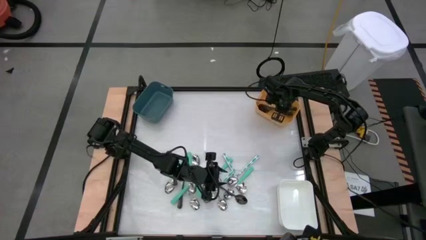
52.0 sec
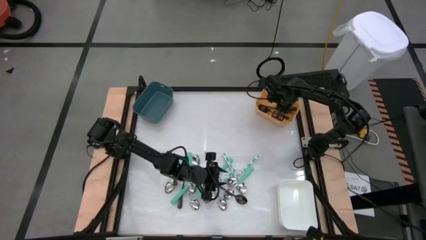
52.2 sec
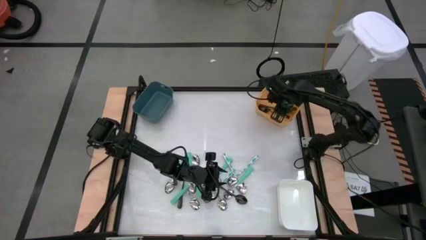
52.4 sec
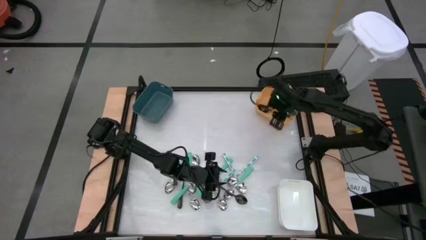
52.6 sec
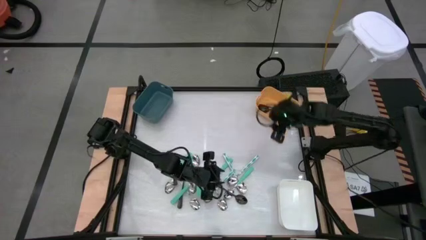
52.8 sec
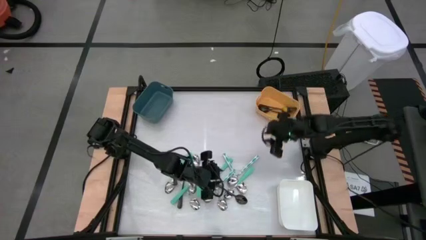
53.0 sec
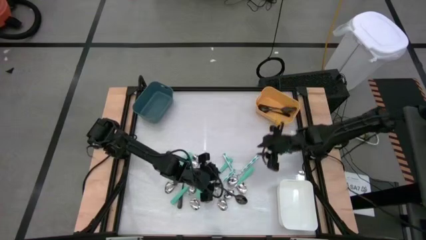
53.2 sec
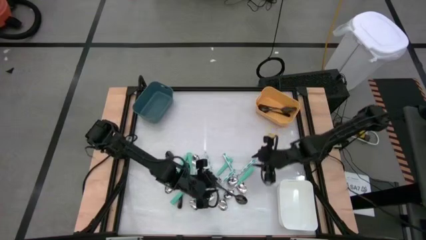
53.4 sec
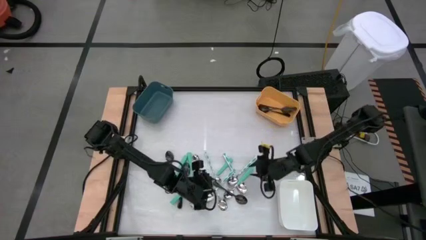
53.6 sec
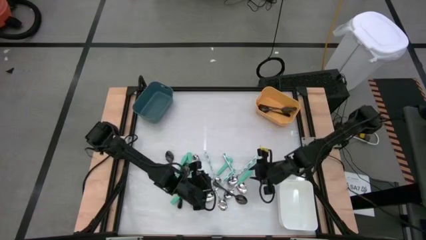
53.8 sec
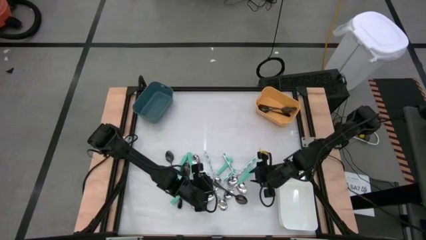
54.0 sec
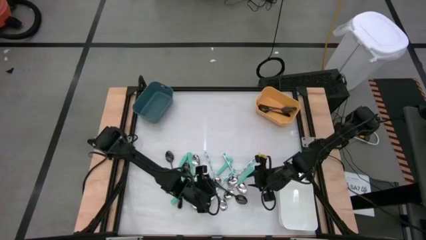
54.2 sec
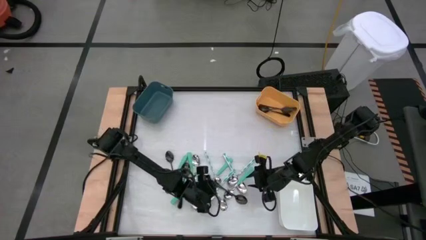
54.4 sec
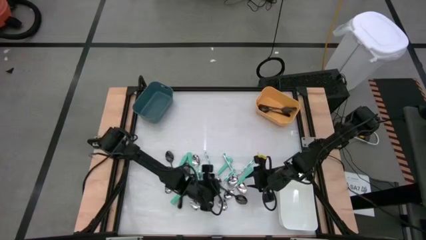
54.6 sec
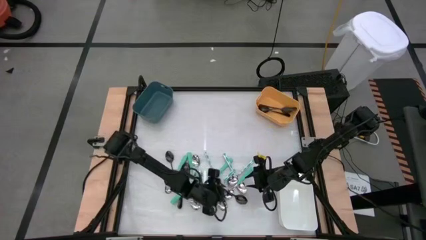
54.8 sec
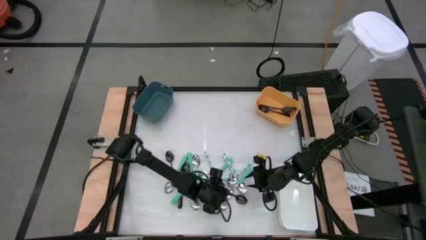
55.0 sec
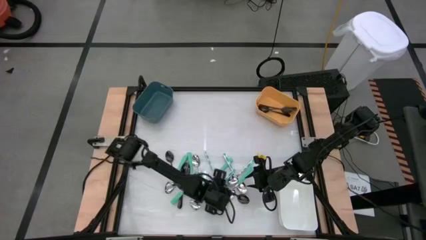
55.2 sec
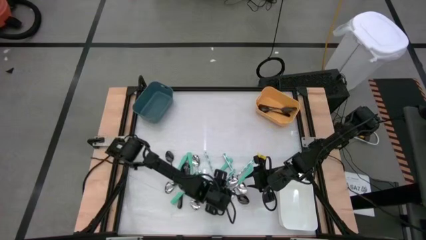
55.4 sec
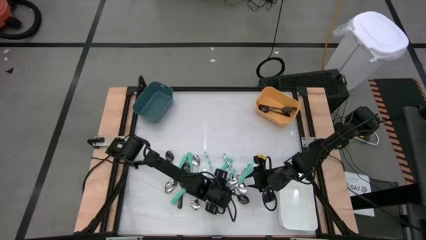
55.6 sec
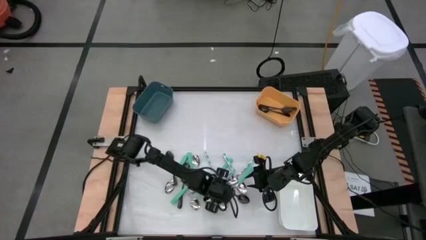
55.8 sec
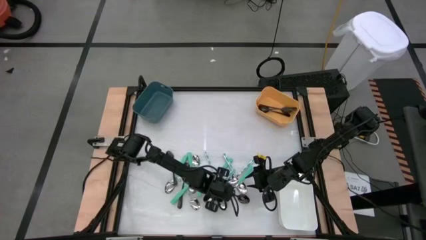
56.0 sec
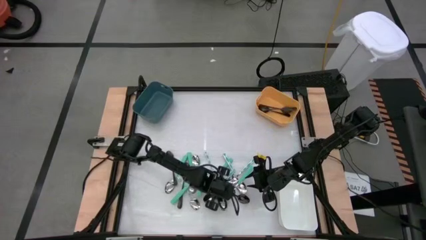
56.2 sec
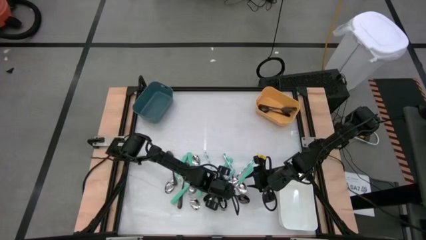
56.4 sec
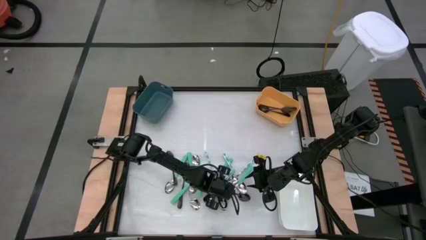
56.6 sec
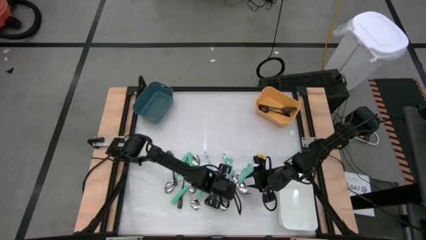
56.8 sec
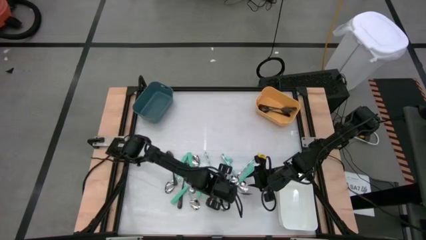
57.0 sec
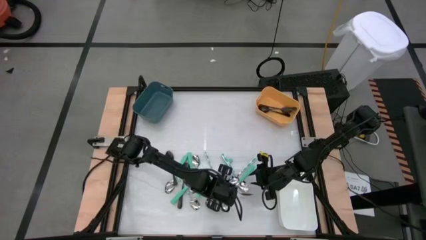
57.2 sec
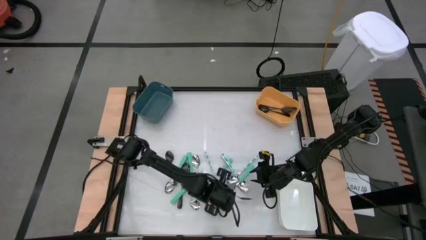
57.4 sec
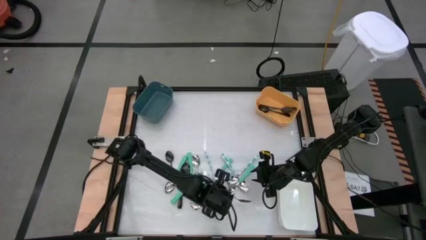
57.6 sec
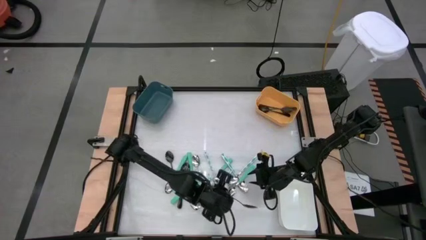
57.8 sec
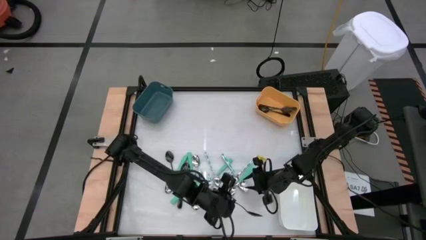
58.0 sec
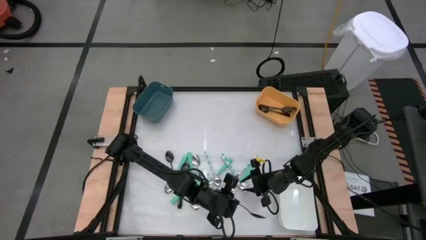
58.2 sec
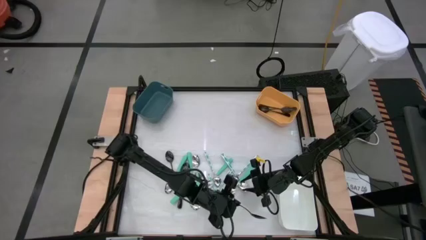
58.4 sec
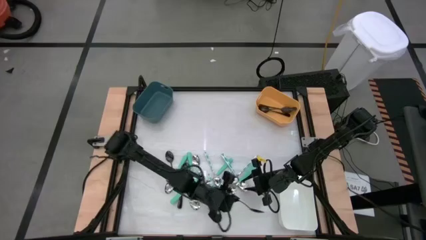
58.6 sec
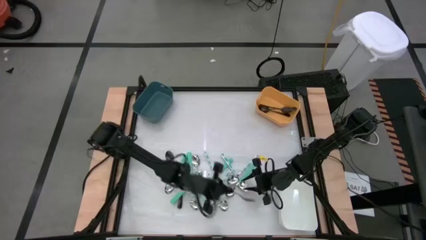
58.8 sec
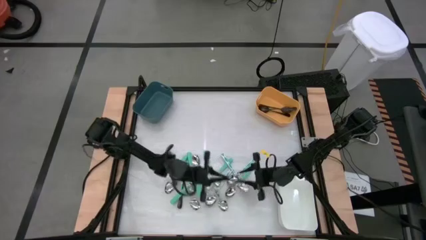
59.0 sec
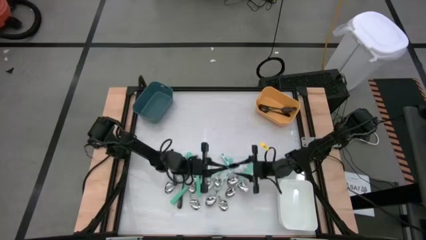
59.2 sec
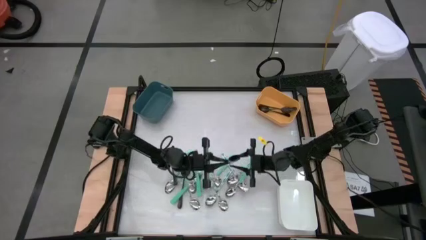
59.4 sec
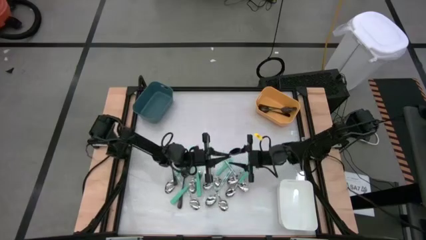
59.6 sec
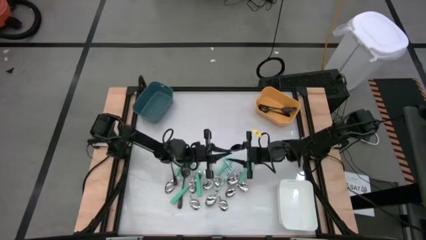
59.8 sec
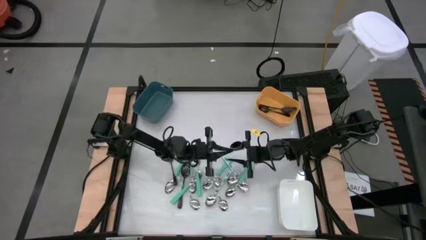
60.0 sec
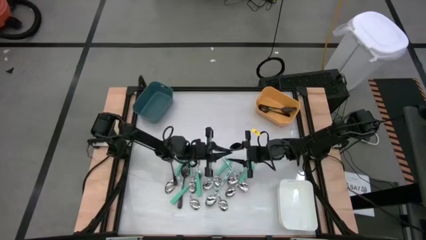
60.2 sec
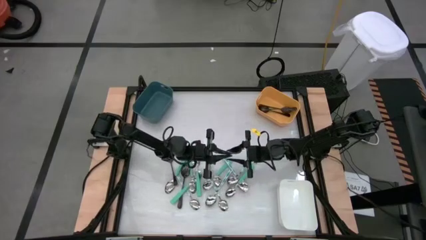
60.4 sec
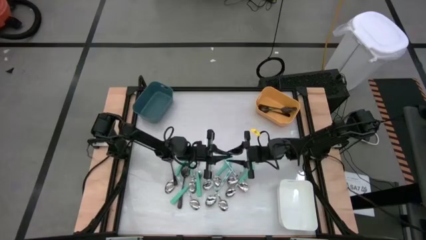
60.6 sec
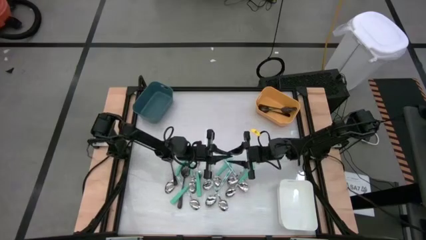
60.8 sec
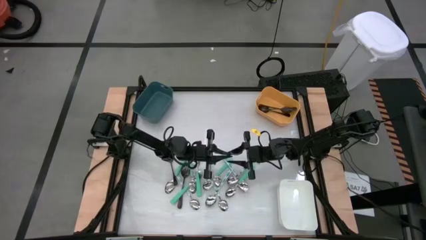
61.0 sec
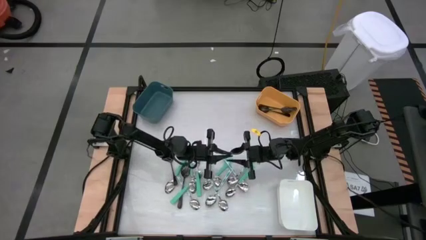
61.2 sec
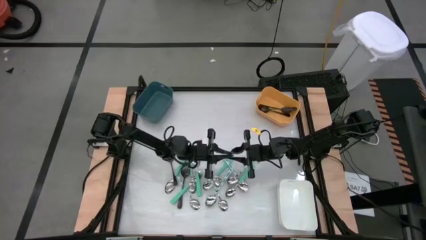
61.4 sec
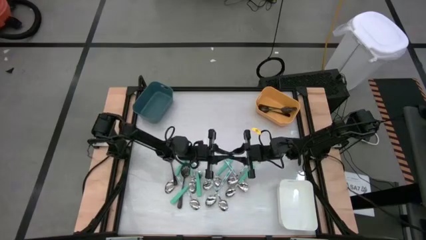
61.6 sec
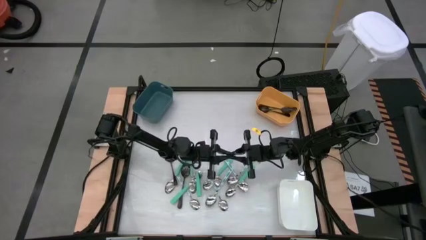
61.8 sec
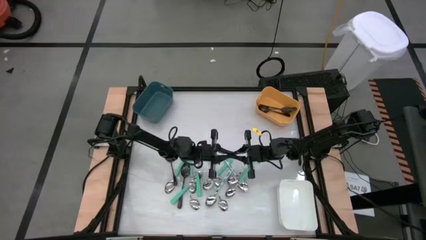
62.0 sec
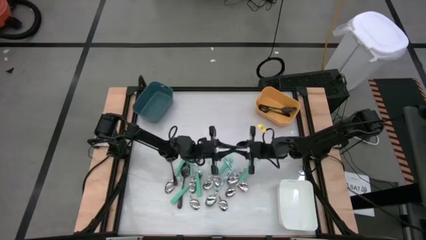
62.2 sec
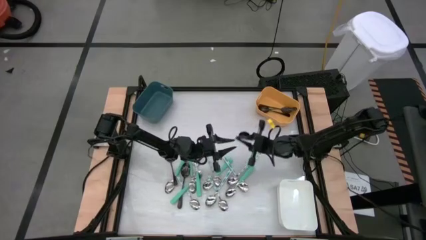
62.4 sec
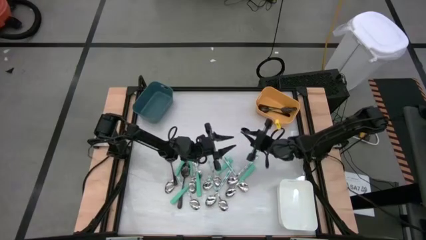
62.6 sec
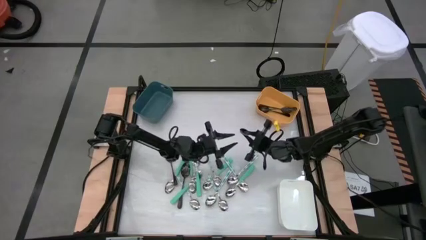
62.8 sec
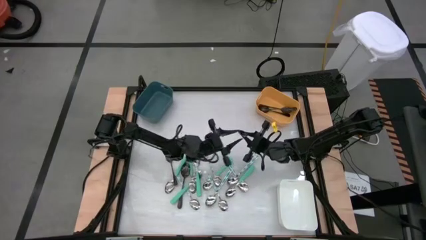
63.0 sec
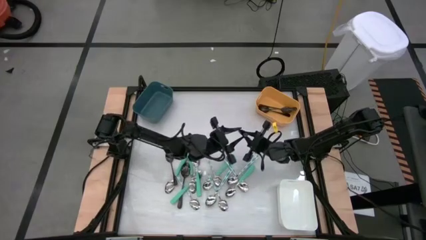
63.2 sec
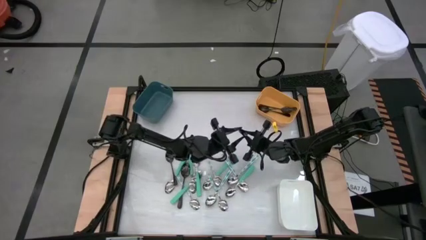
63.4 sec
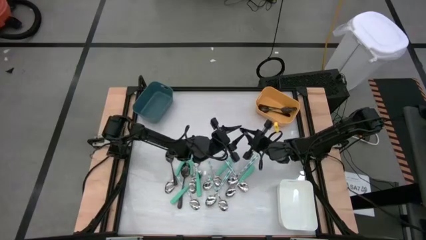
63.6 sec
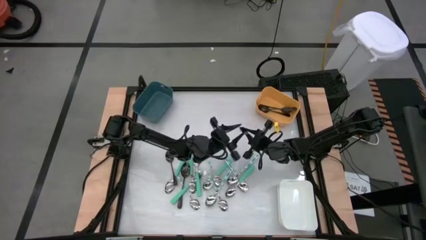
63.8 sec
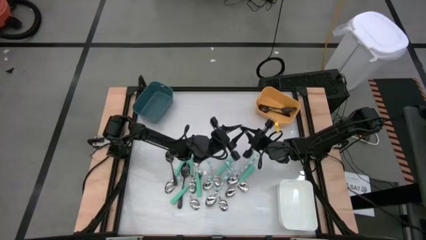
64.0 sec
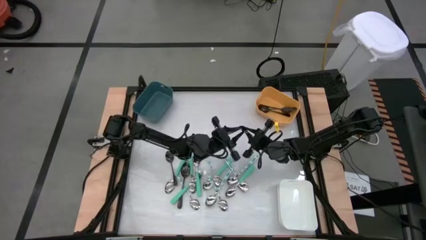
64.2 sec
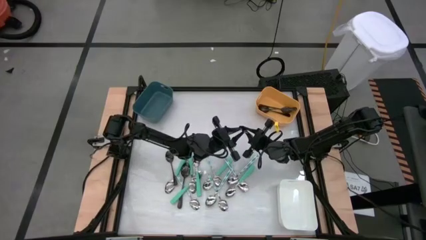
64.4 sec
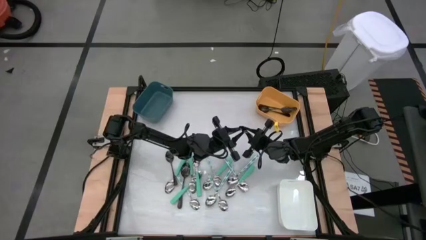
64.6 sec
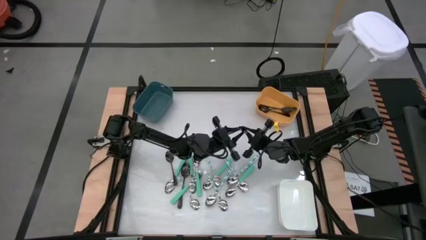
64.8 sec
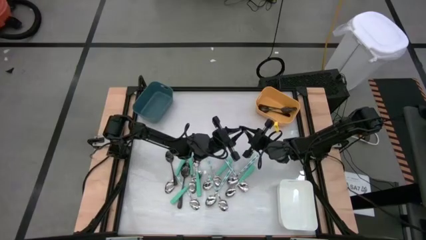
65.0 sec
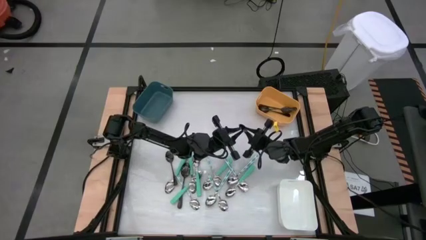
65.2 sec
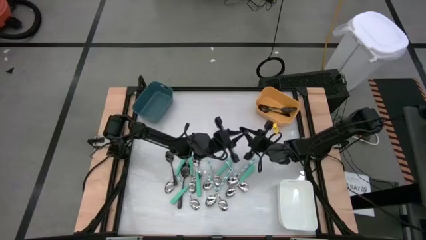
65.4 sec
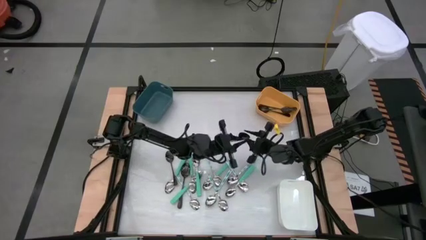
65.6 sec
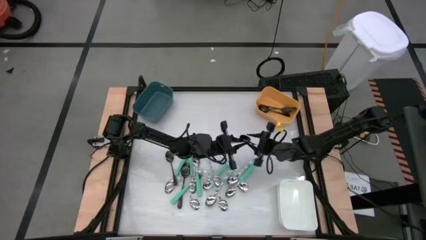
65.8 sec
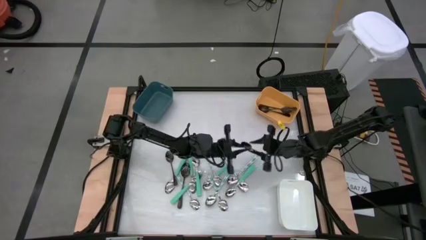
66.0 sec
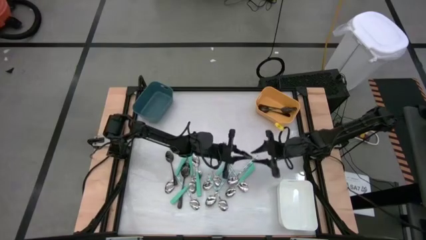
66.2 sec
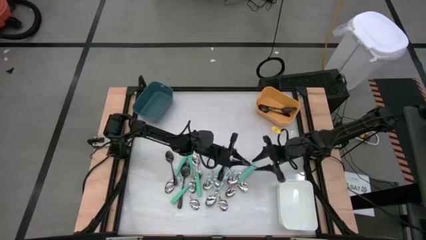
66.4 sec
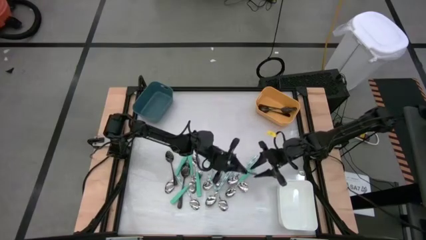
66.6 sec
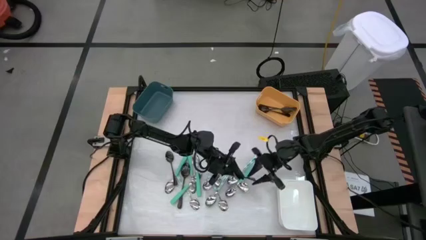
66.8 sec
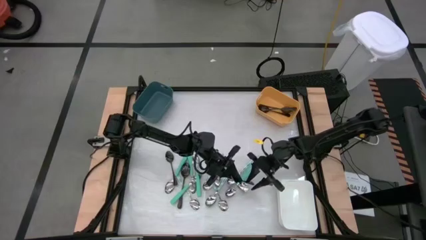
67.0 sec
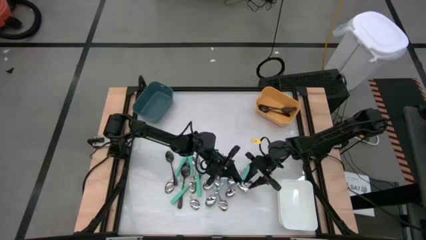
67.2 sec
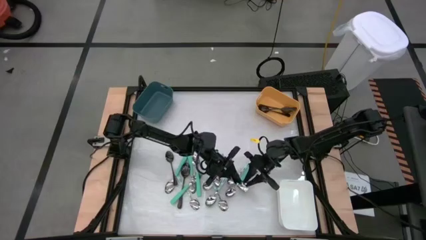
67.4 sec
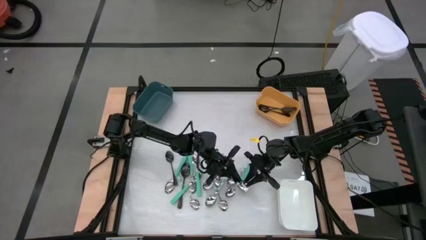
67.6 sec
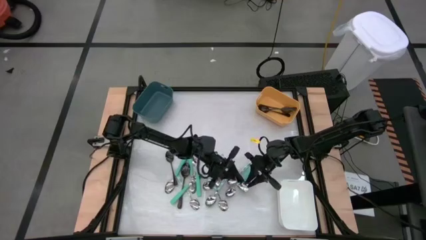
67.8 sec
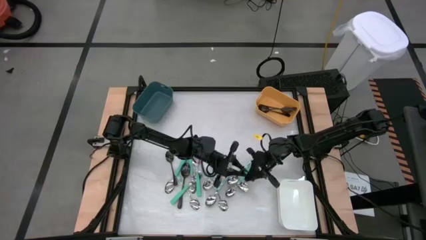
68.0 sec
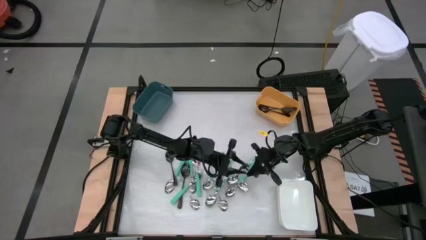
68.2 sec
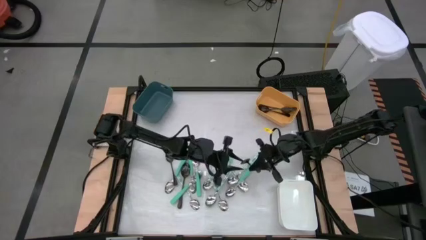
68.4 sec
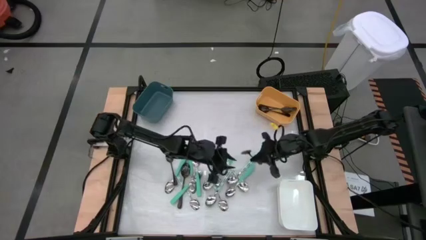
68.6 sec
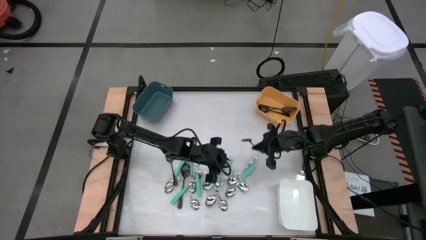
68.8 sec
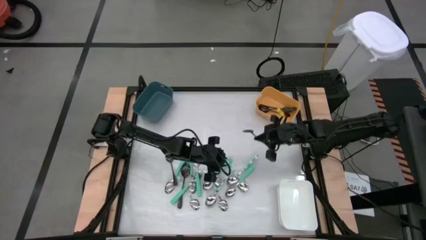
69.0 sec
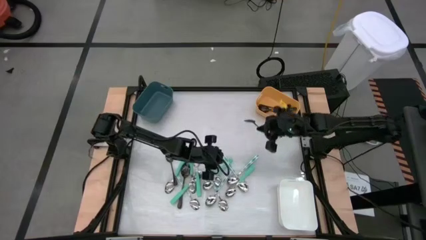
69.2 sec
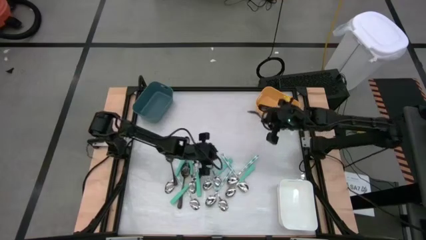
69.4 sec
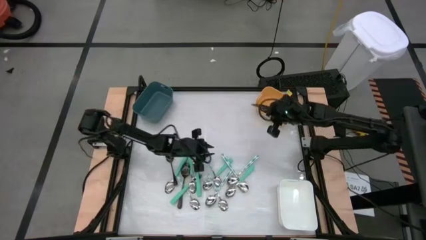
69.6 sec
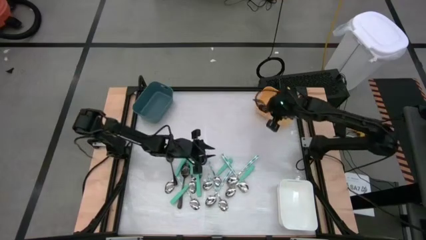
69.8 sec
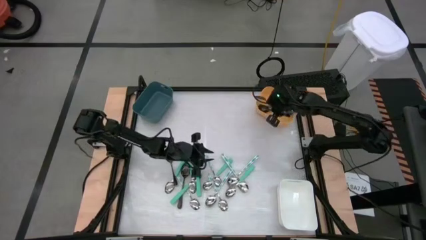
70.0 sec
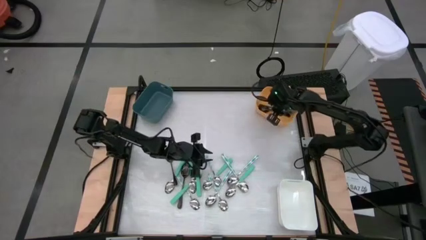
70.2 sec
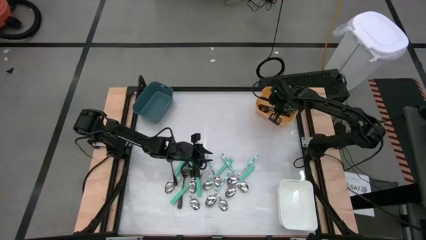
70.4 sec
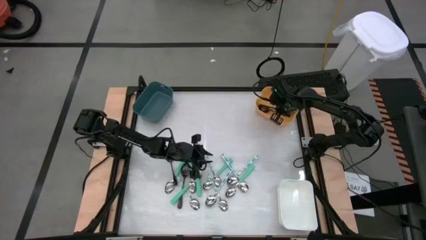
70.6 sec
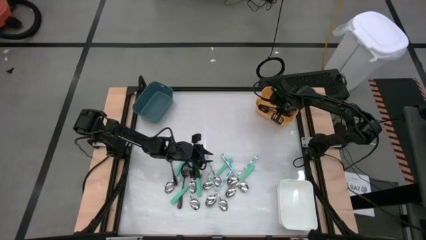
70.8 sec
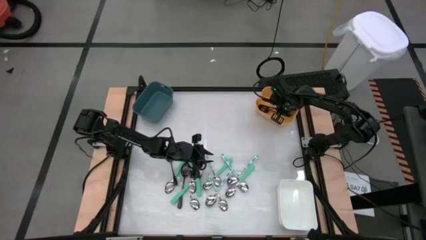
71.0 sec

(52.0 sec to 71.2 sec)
Task: Sort silverware by color (type)
Put the black spoon into the yellow bin
